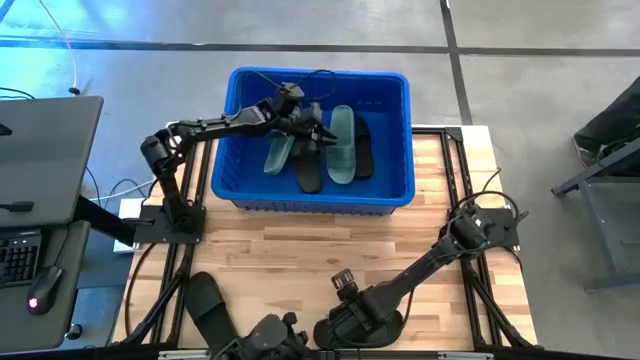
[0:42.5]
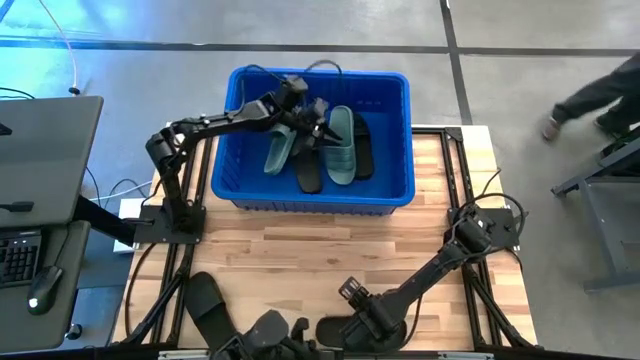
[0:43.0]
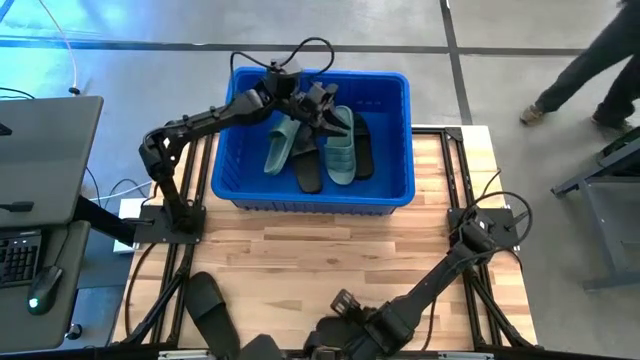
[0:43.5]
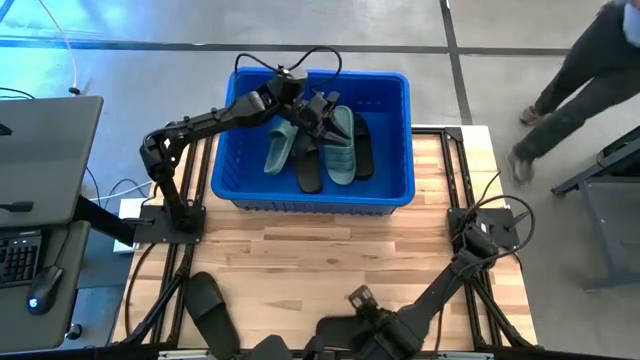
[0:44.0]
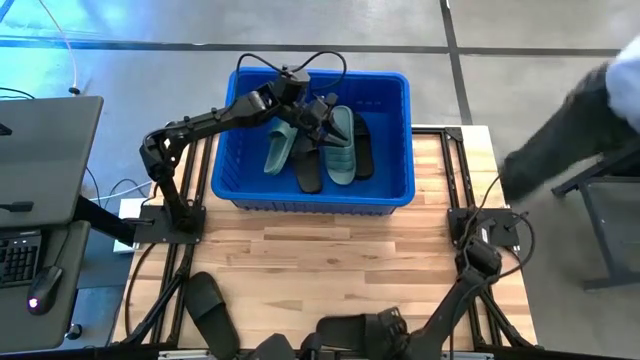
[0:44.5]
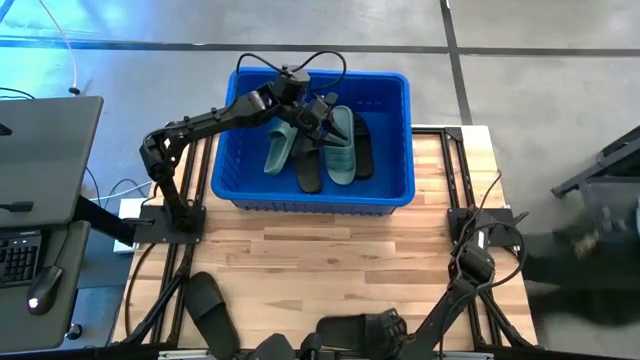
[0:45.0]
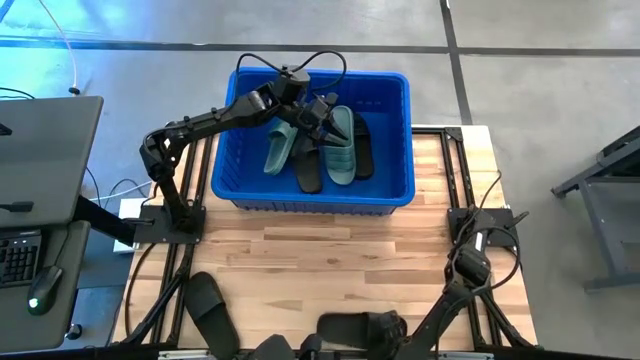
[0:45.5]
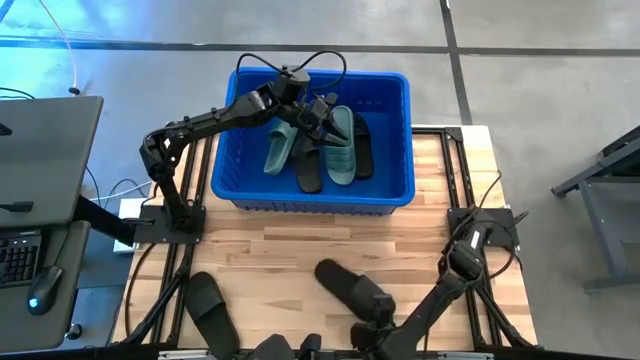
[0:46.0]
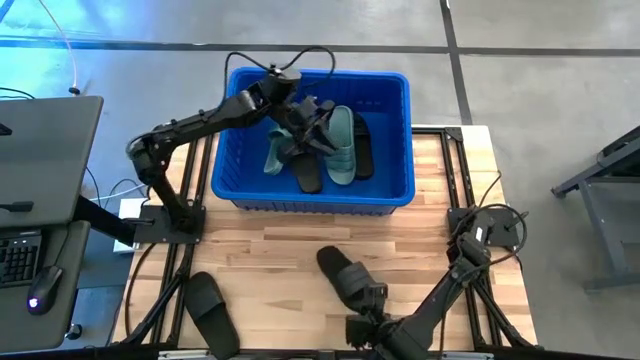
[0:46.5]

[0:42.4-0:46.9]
Task: Pick and place slides into bin
Put the black slide into the blue container

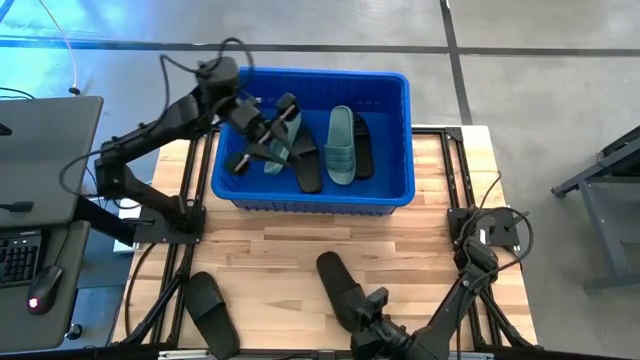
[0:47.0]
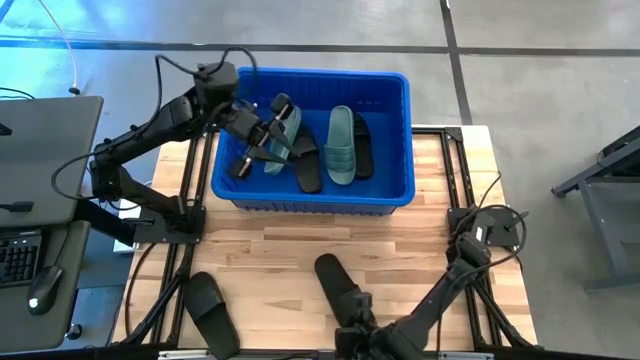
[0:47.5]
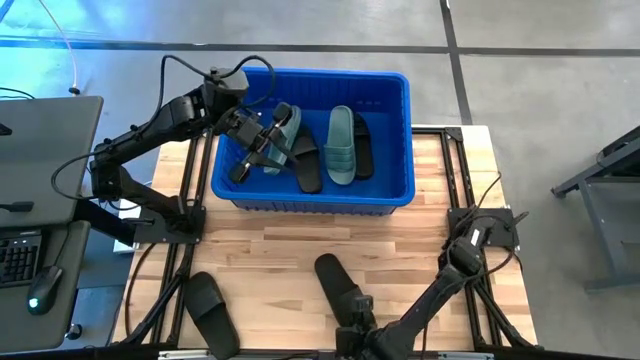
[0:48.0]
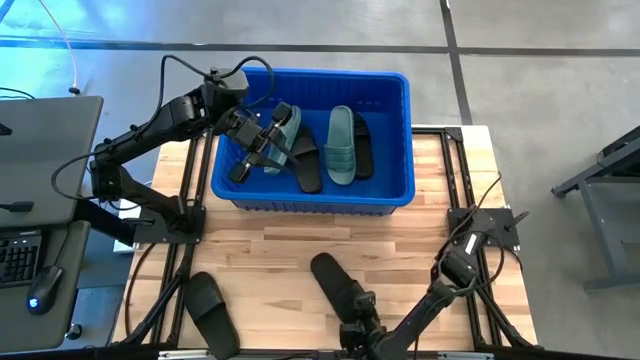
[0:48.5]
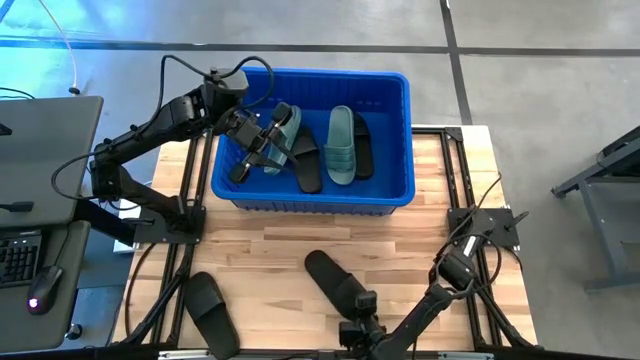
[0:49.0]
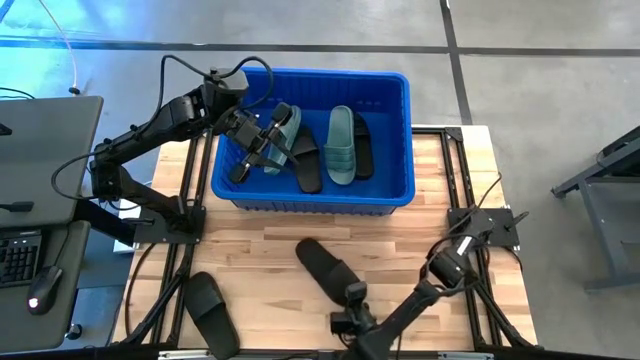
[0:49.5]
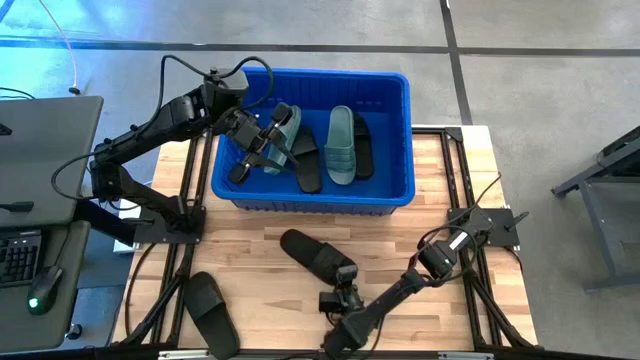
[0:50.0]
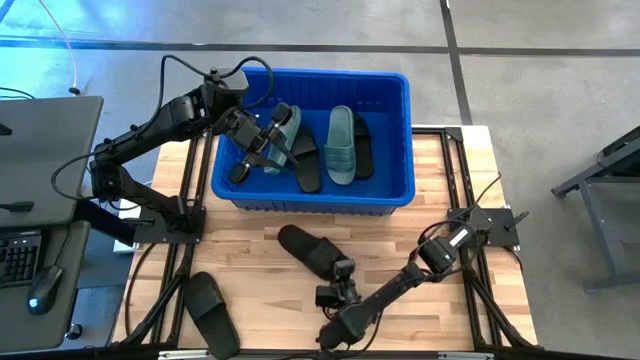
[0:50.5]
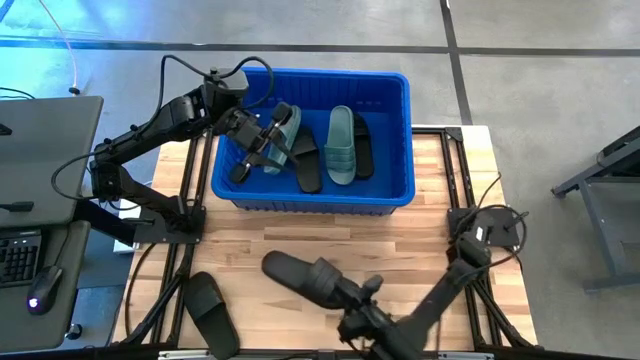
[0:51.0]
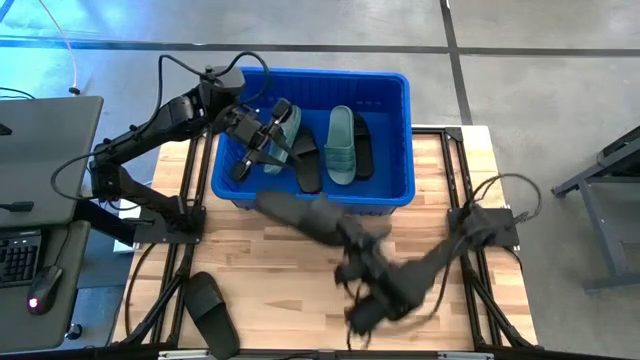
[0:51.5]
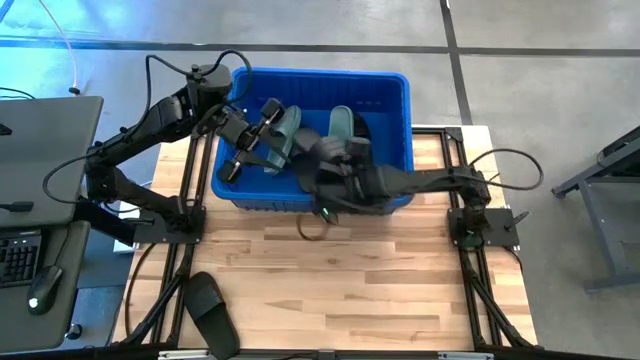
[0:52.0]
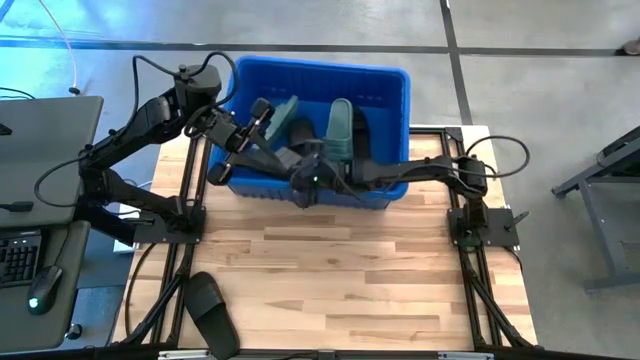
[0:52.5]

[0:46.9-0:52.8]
Put the black slide into the blue container

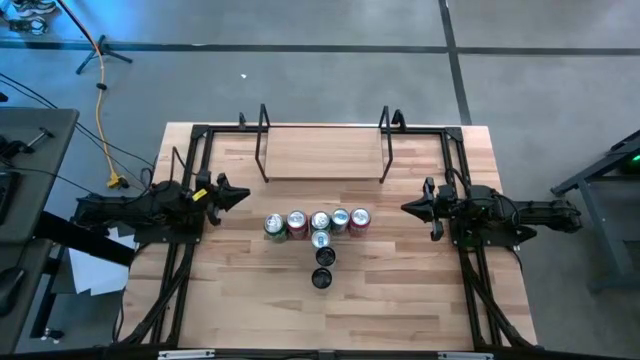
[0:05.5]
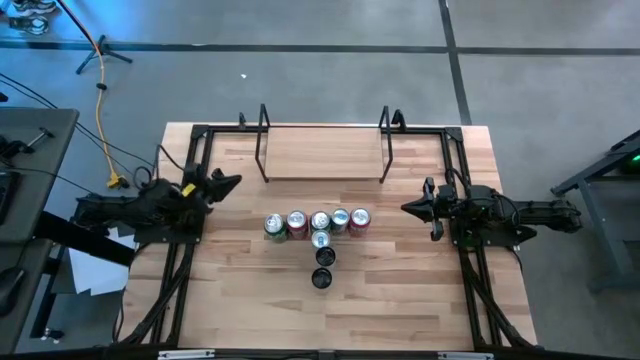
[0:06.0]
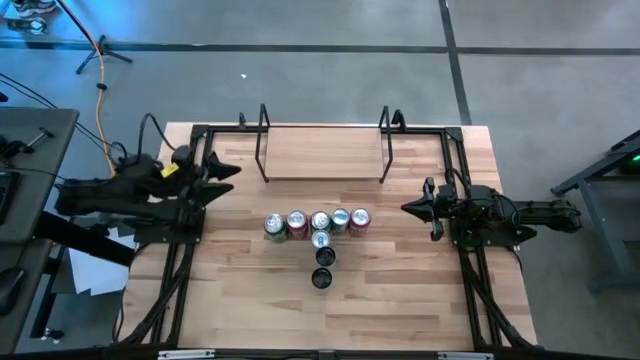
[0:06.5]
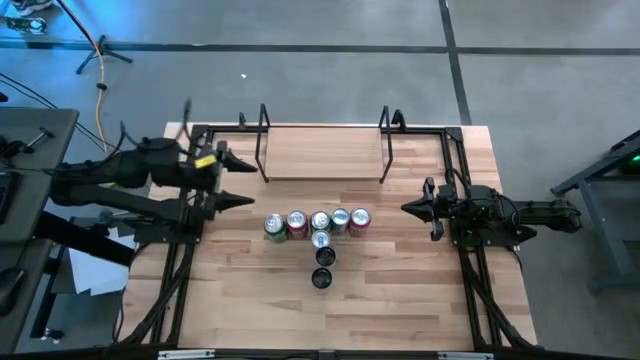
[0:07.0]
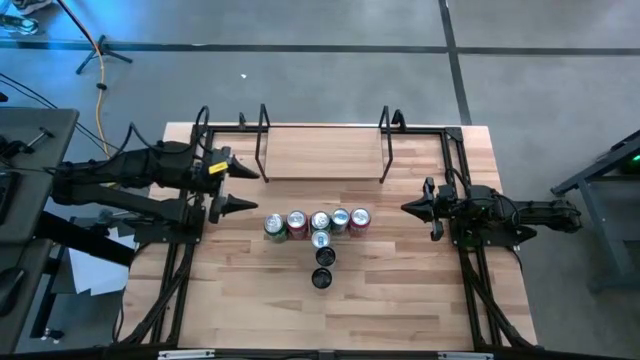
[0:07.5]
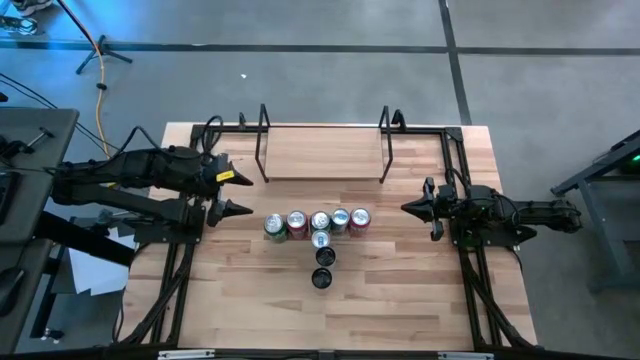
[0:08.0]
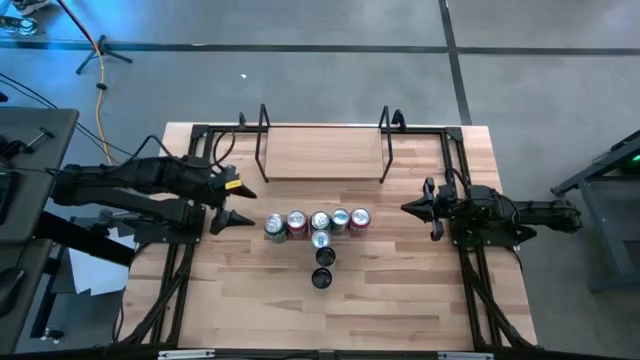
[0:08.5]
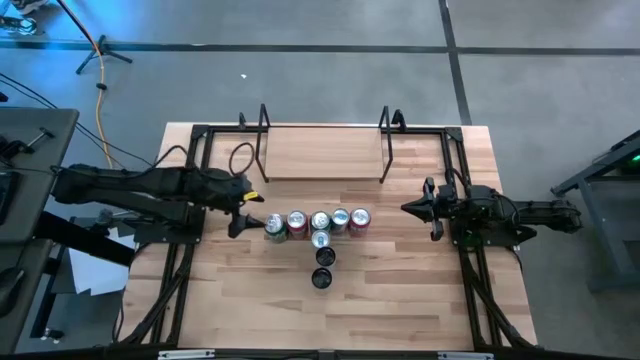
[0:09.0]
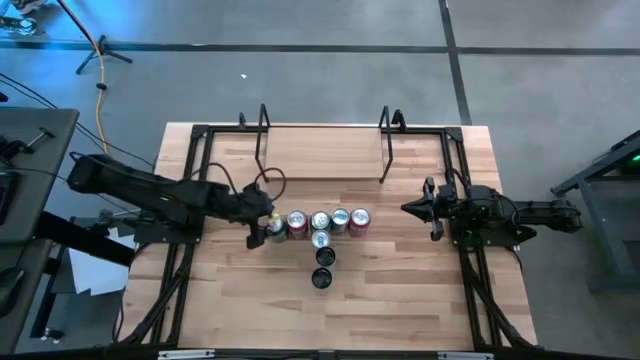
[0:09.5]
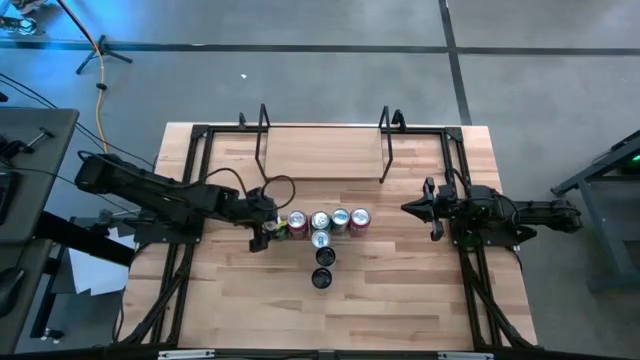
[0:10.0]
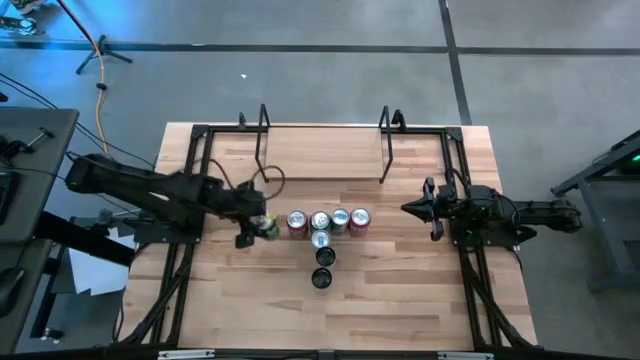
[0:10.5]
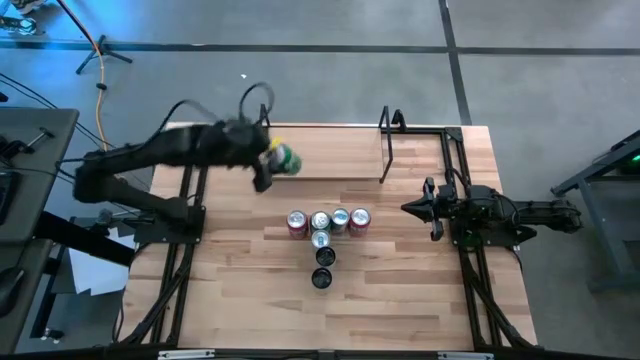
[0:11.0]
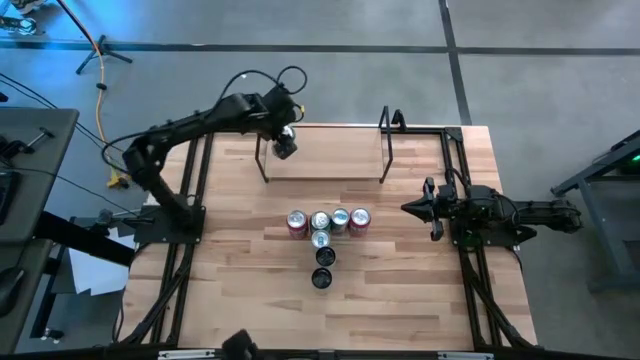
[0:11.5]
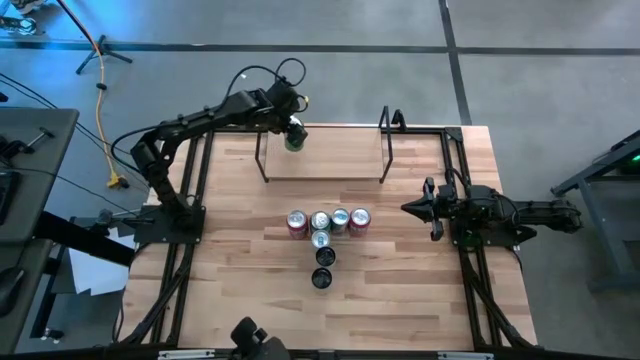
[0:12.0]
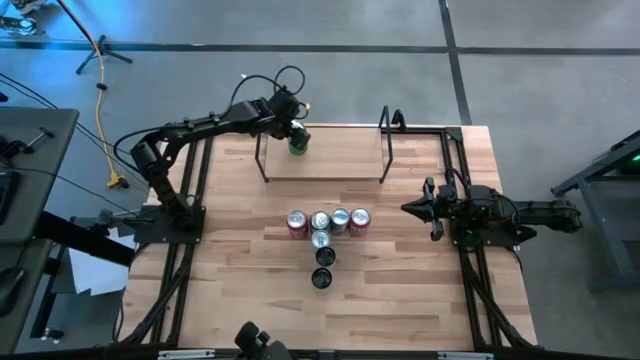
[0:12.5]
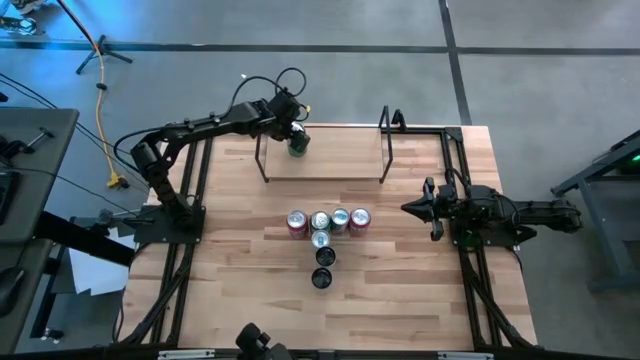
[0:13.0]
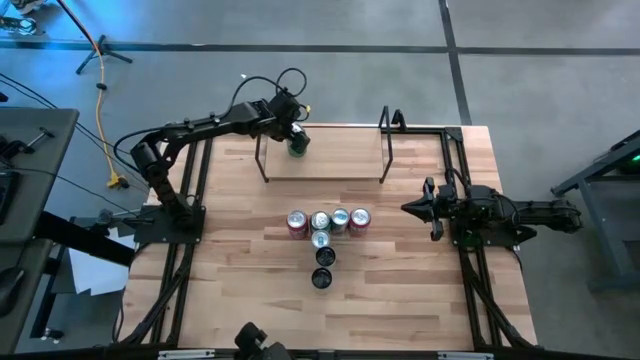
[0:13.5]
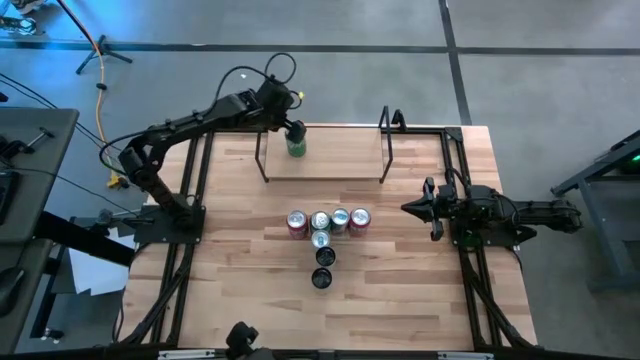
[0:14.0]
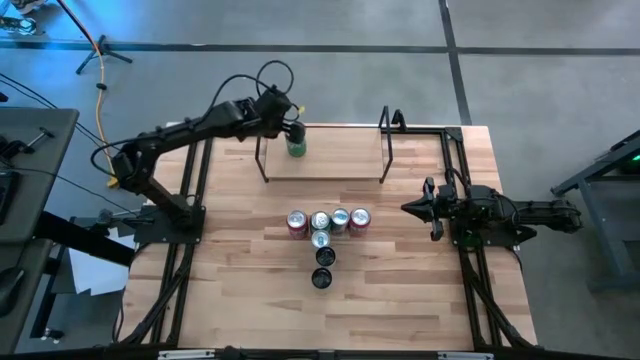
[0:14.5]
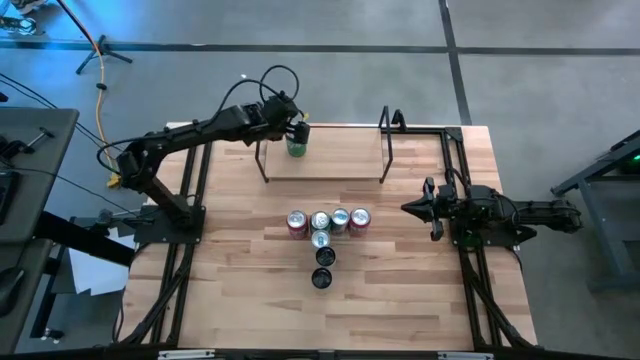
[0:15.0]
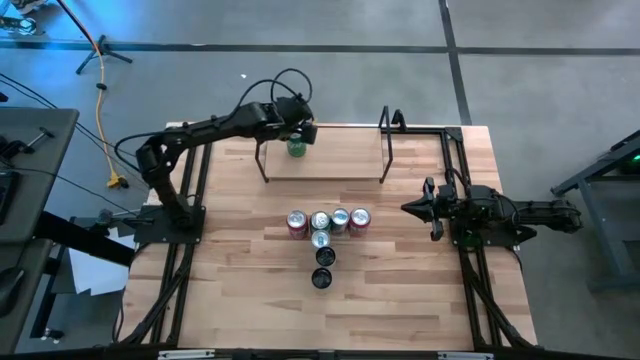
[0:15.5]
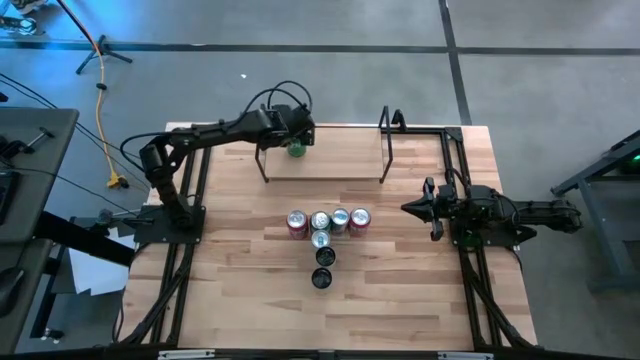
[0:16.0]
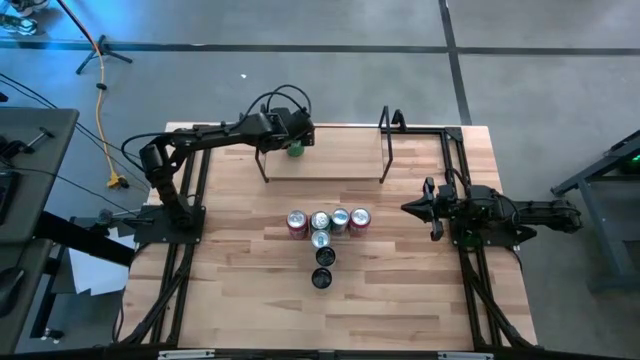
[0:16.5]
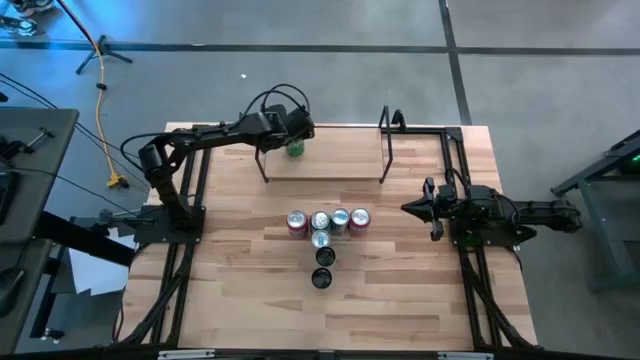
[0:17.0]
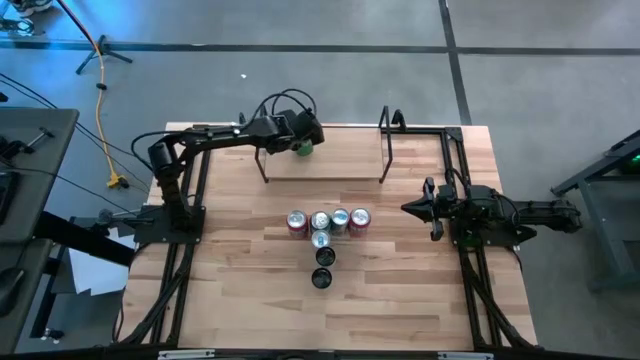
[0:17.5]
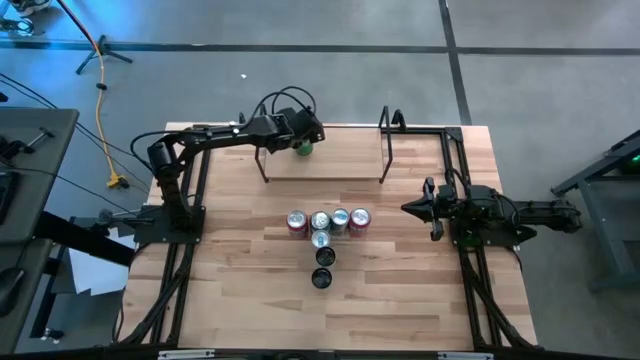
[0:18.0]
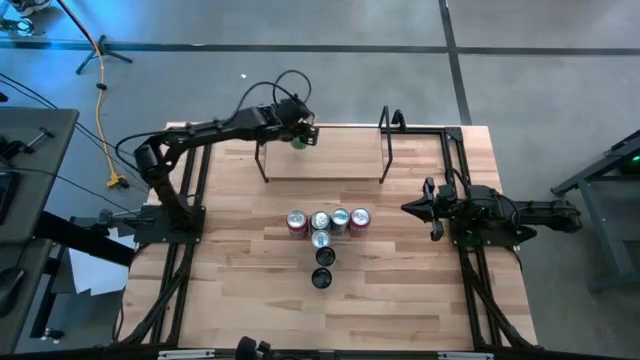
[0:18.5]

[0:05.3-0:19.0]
Task: Place canned beverage on shelf
Put the left green soda can on the shelf
